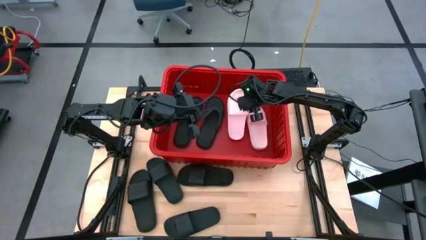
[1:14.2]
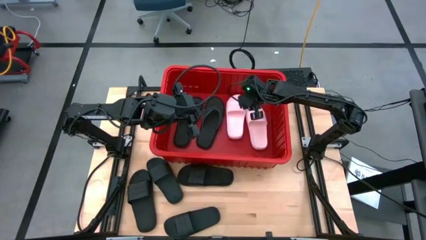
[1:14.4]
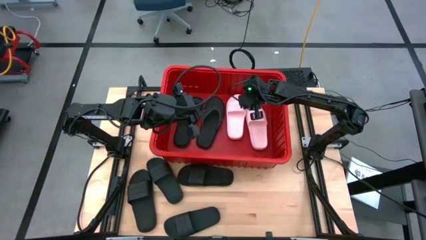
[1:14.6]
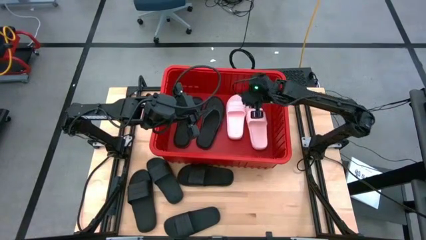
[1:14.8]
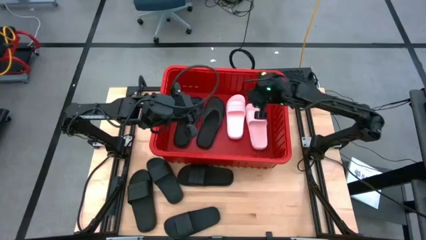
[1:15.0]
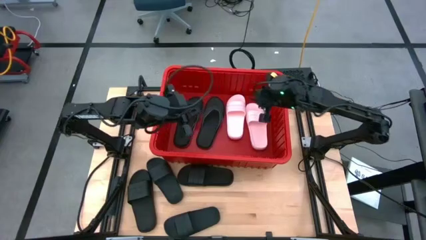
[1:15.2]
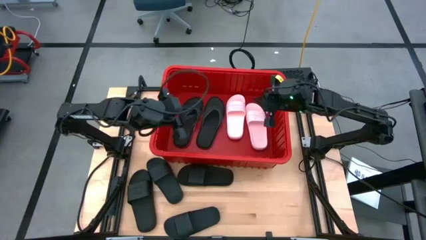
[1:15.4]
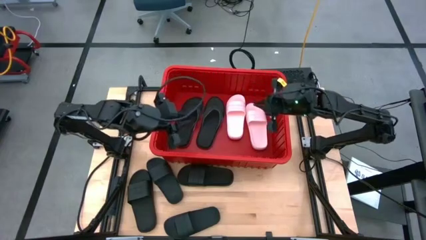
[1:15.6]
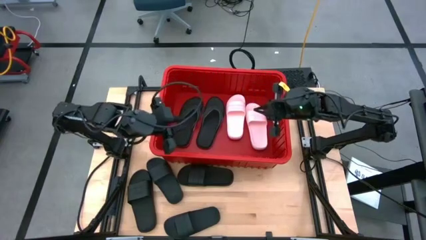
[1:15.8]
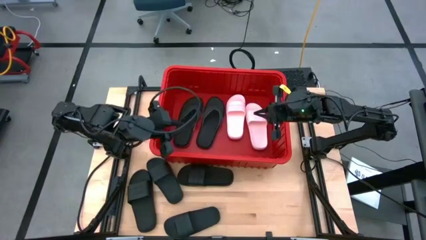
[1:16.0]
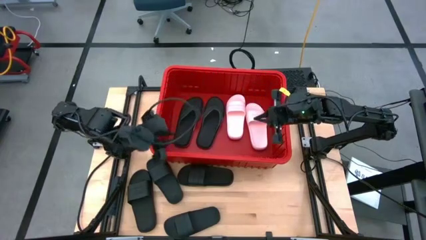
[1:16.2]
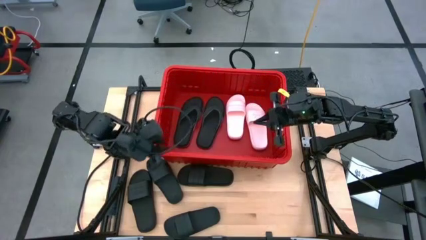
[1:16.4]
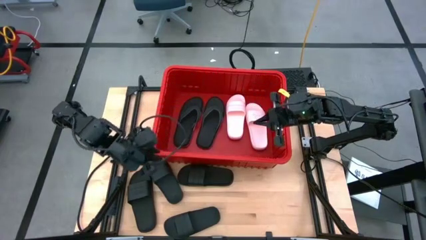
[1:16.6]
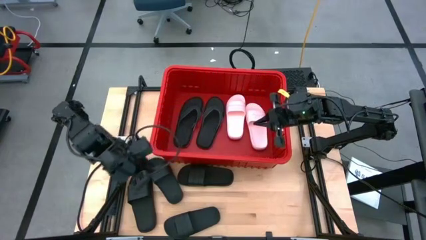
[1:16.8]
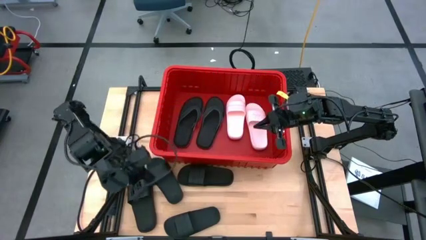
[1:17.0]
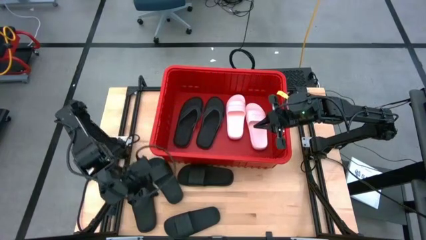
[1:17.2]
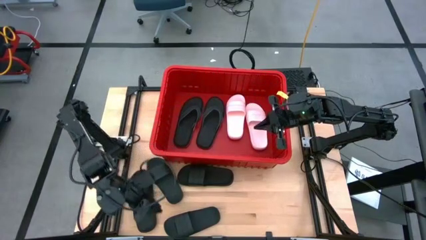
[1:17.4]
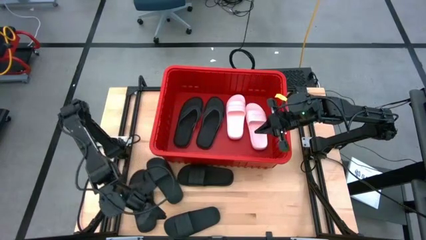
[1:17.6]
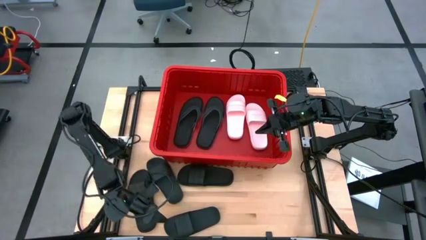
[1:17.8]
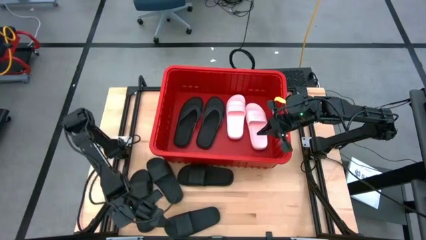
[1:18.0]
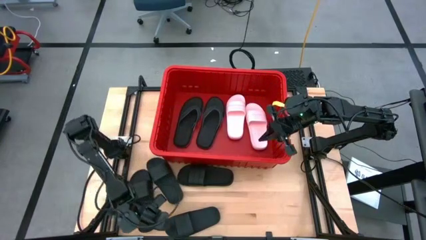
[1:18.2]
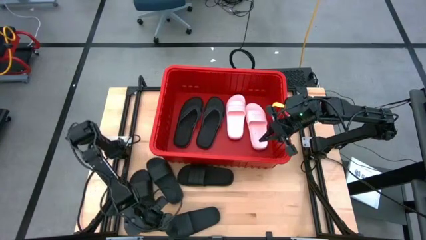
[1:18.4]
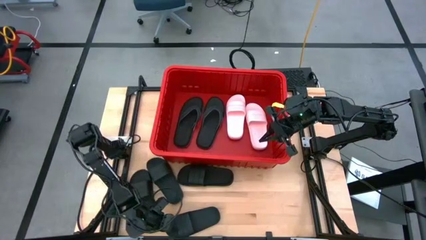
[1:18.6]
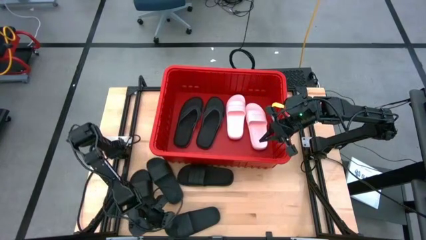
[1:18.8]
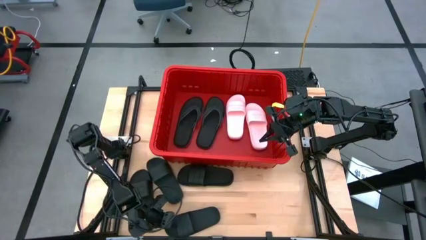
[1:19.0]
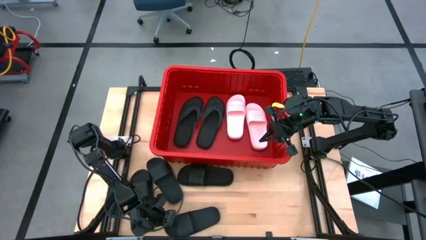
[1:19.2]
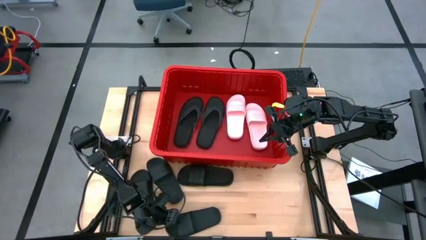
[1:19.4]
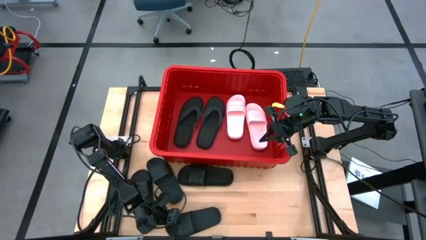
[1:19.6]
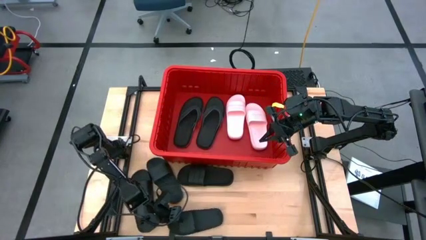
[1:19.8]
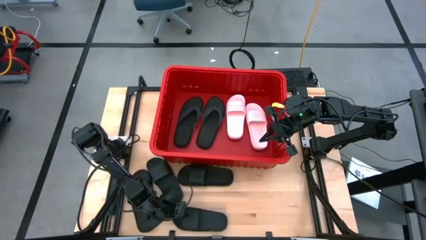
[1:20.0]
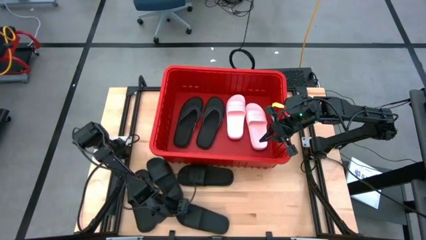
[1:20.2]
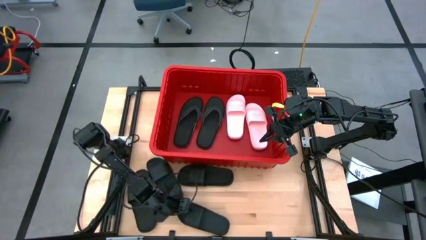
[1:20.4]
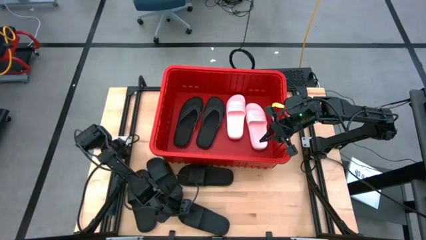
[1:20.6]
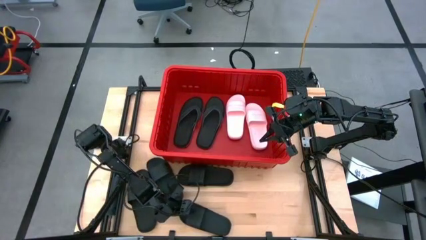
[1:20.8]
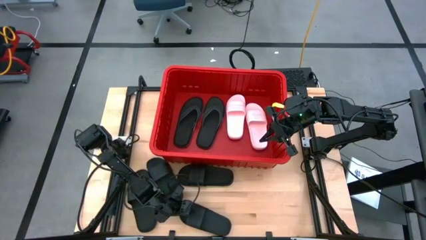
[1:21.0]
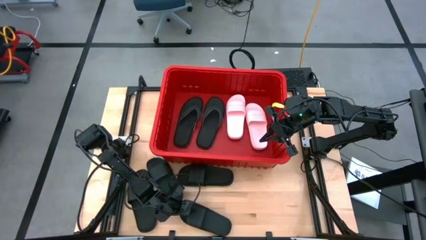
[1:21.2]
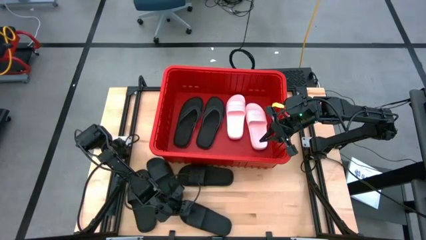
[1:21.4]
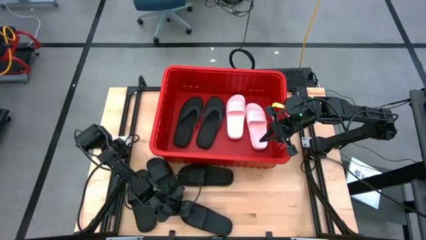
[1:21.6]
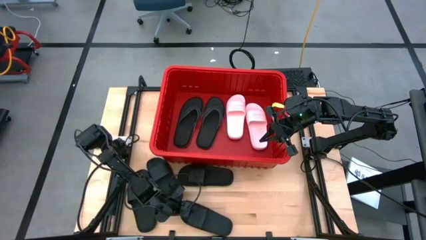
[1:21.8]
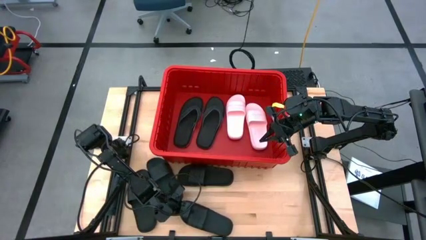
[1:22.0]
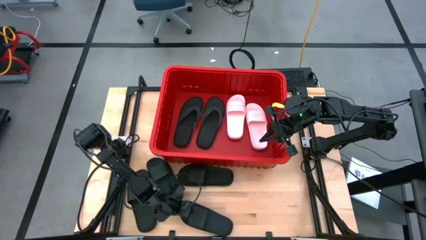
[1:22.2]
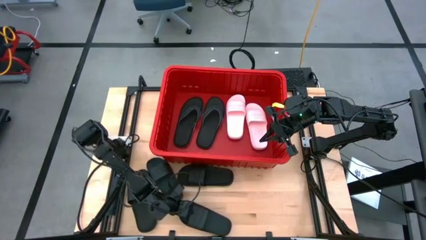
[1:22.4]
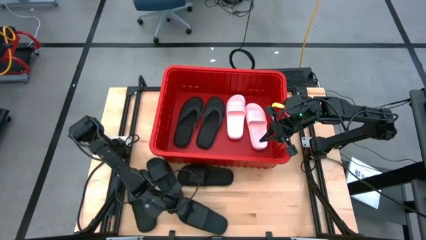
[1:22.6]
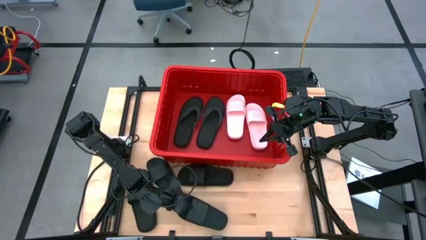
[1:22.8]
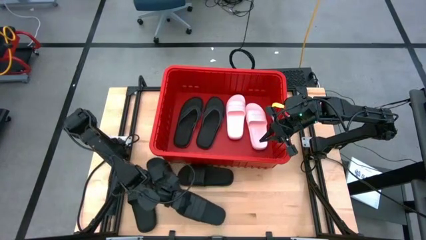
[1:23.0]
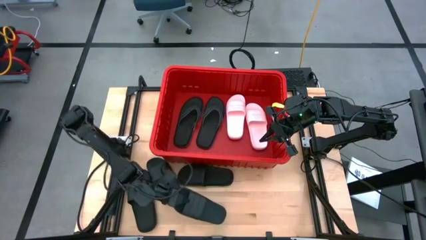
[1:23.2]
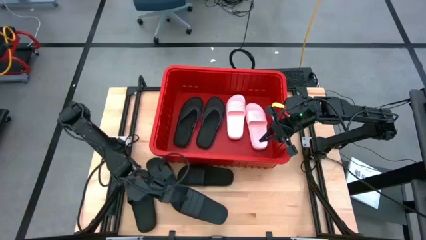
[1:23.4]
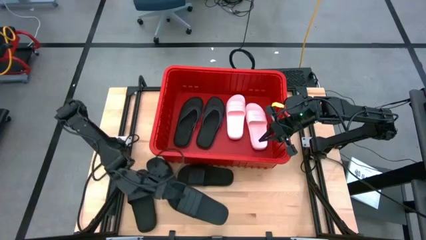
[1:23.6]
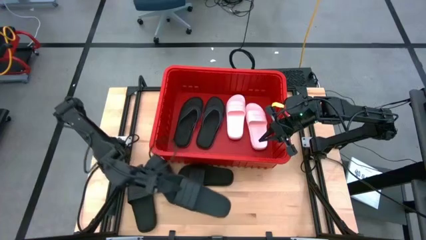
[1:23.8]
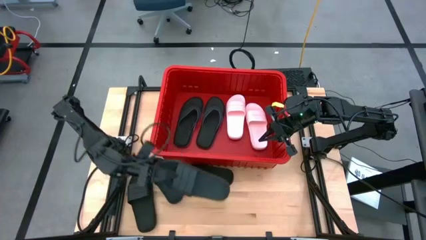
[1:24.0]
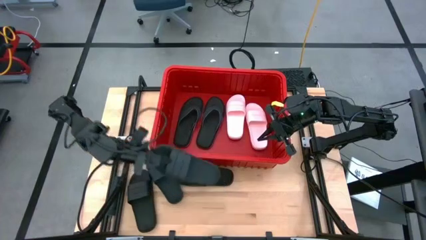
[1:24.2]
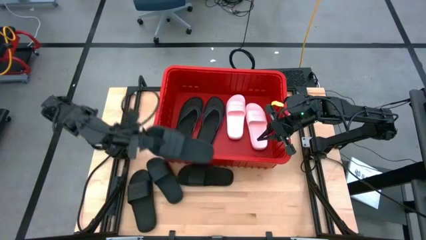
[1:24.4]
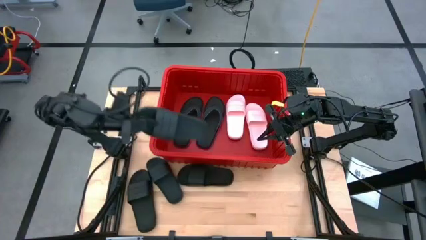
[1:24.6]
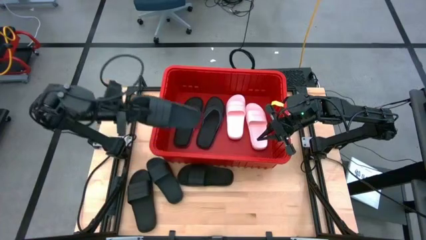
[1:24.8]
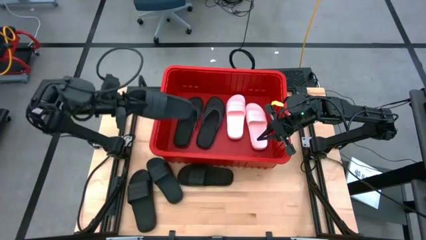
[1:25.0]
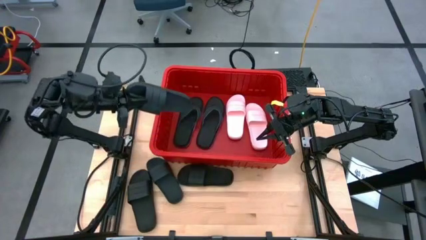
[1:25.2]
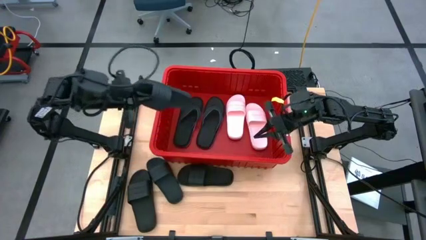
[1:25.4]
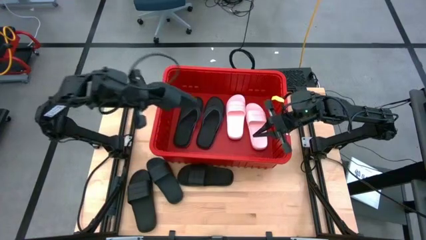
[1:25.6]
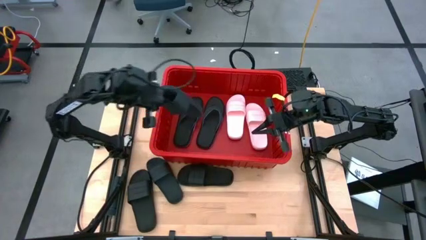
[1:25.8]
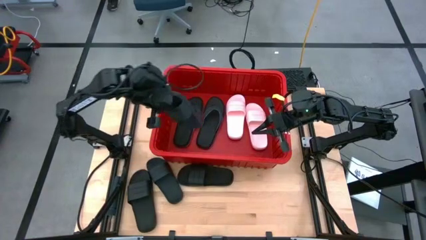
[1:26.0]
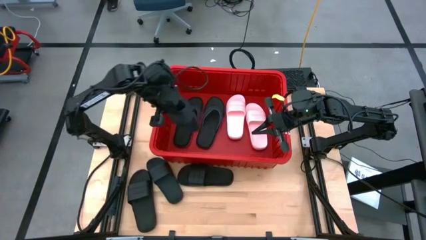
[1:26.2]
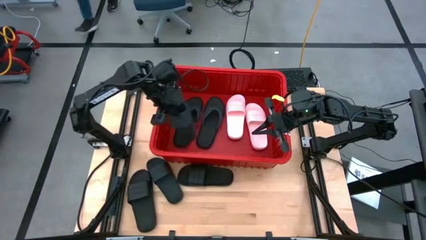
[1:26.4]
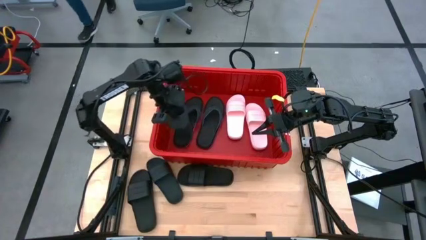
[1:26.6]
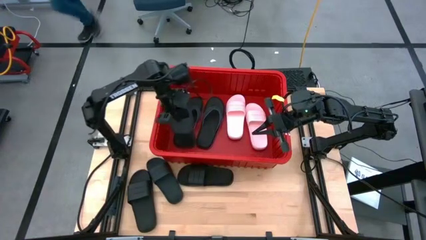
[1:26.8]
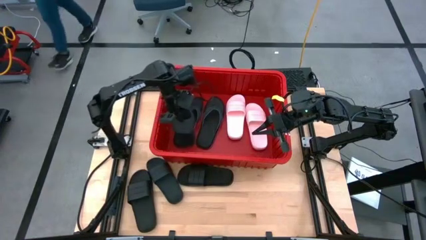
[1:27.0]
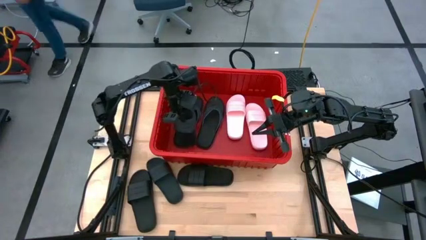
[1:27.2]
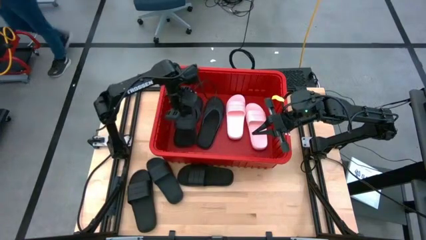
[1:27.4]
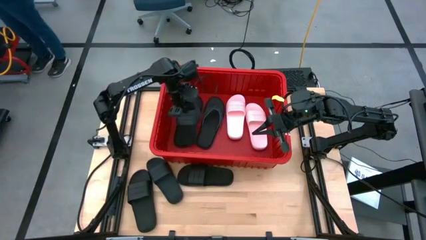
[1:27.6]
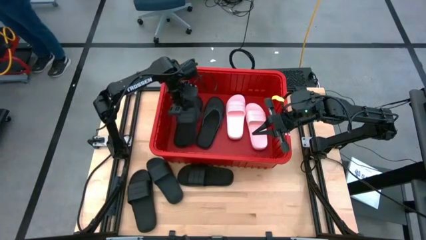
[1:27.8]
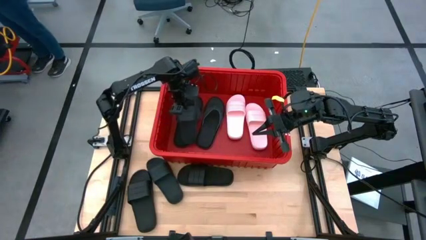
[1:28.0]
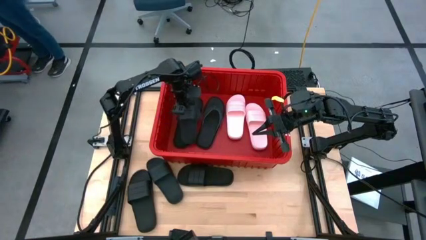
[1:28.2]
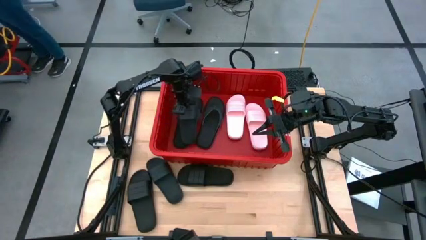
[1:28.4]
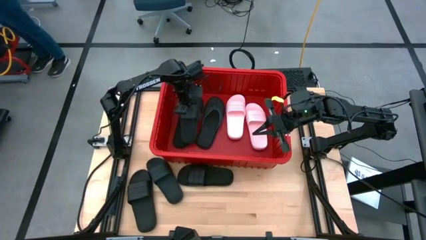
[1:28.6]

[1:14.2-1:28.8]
Task: Pick and place slides into bin
Put the black slide into the red bin
